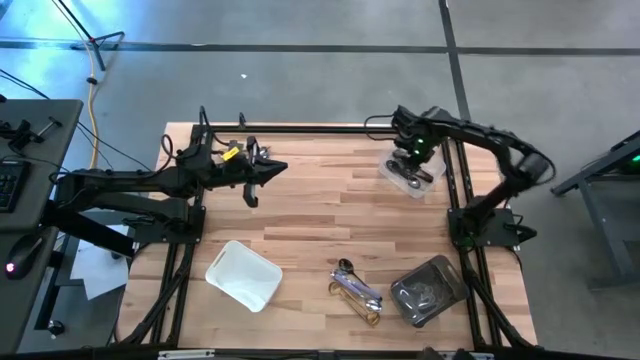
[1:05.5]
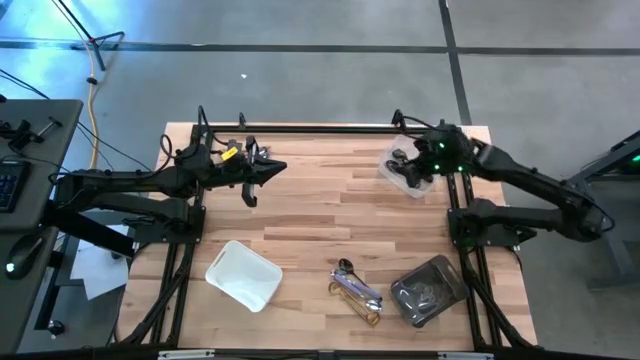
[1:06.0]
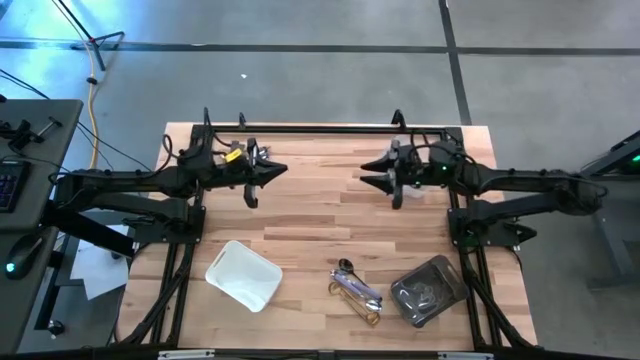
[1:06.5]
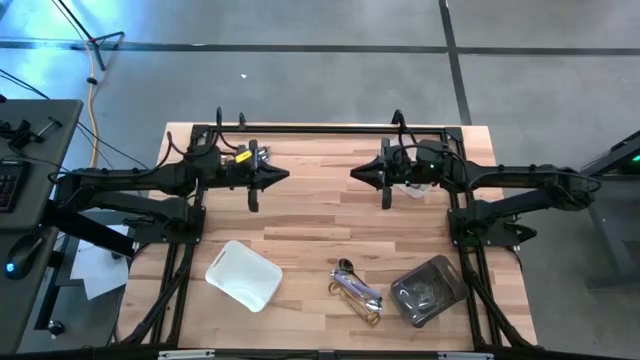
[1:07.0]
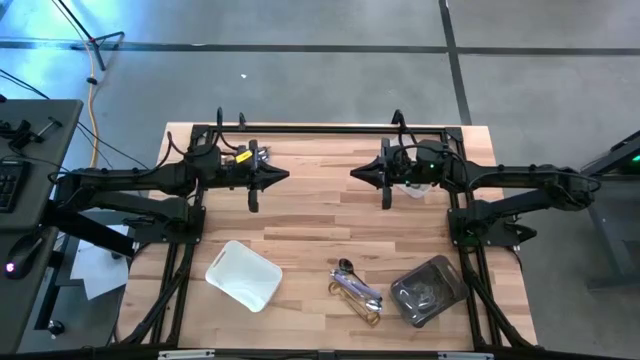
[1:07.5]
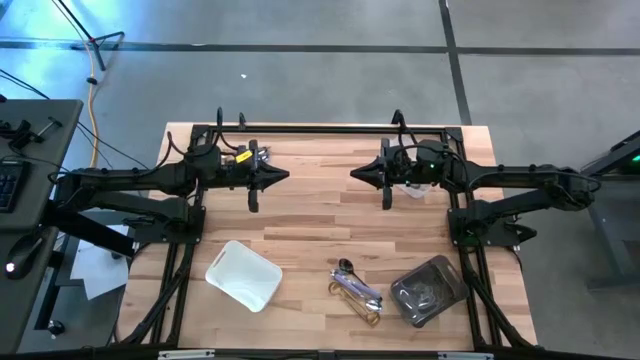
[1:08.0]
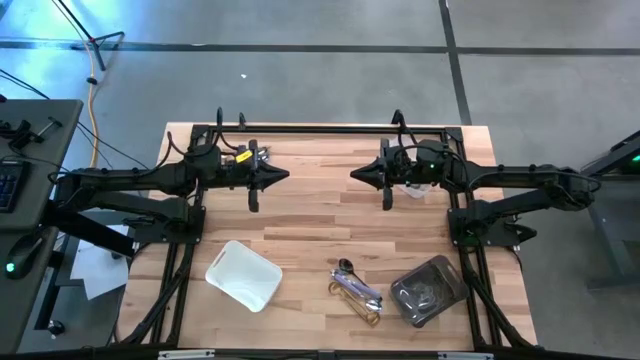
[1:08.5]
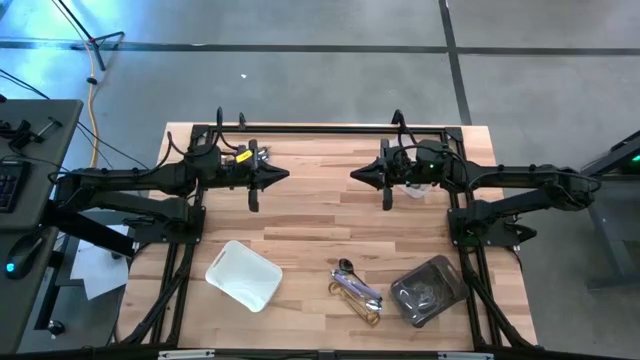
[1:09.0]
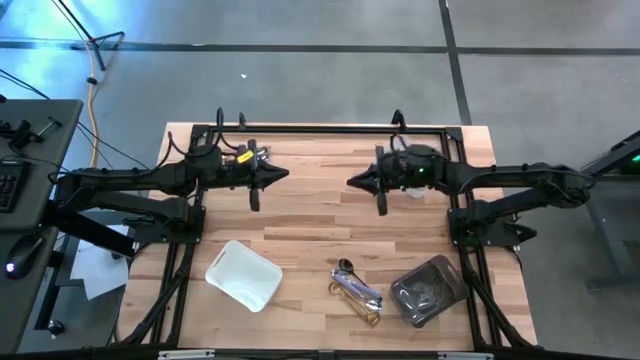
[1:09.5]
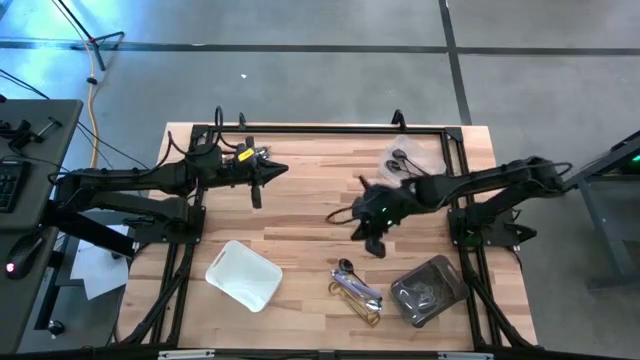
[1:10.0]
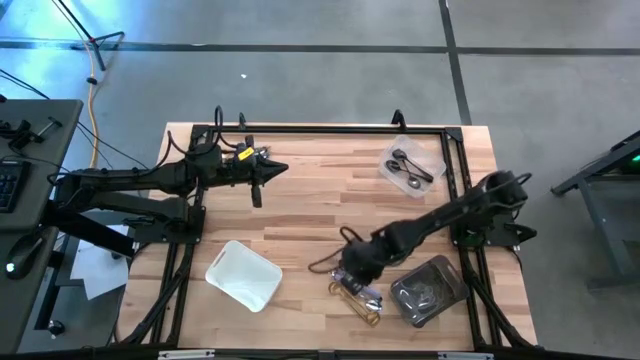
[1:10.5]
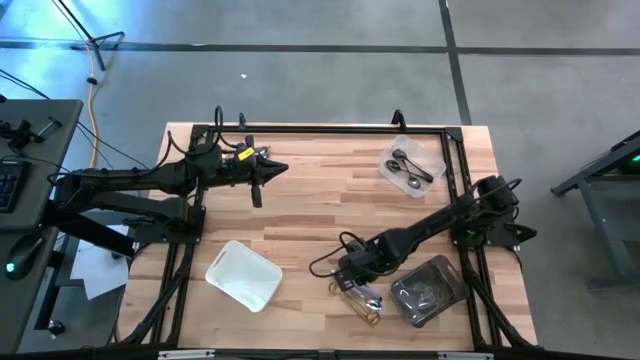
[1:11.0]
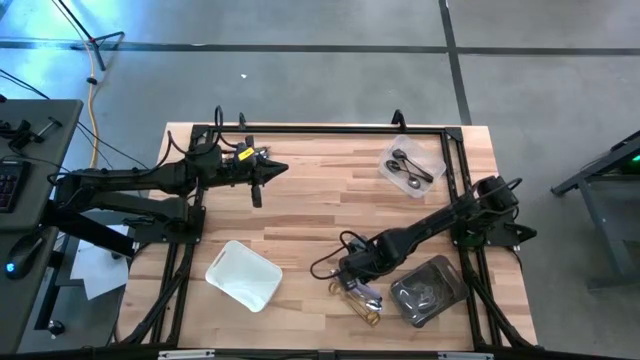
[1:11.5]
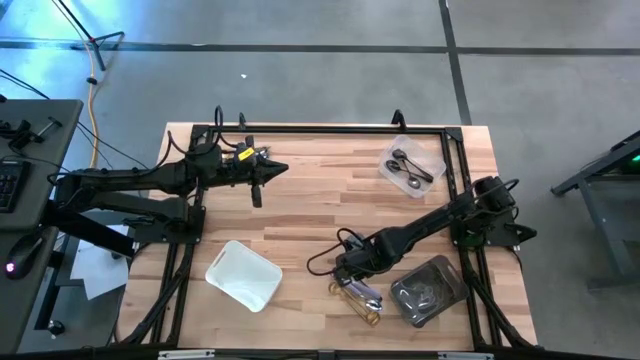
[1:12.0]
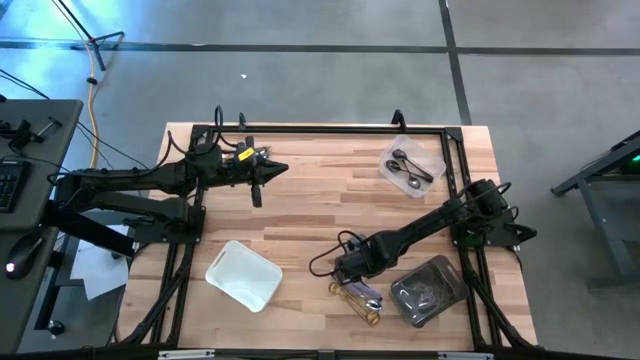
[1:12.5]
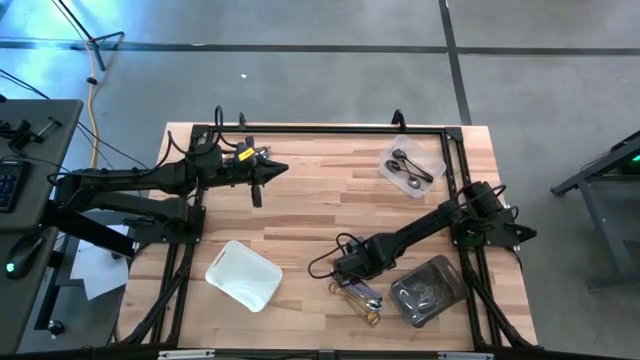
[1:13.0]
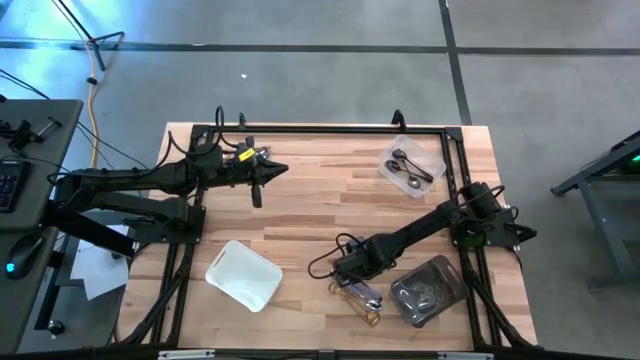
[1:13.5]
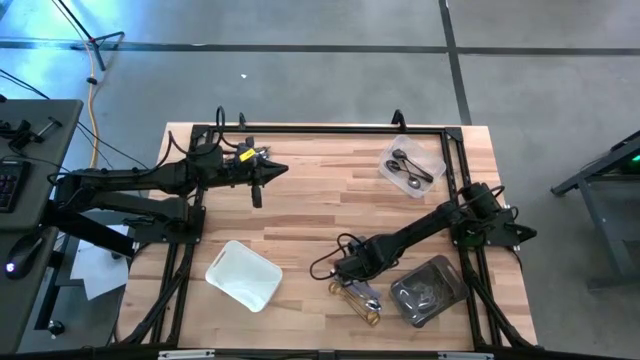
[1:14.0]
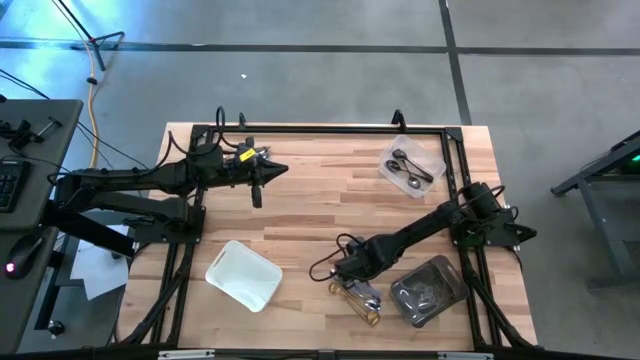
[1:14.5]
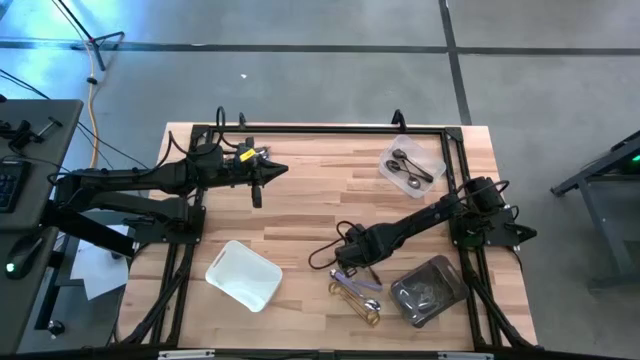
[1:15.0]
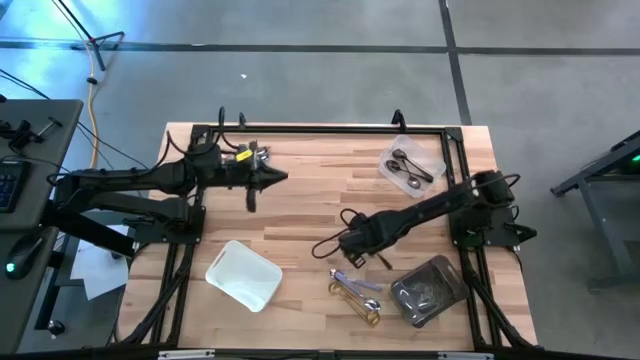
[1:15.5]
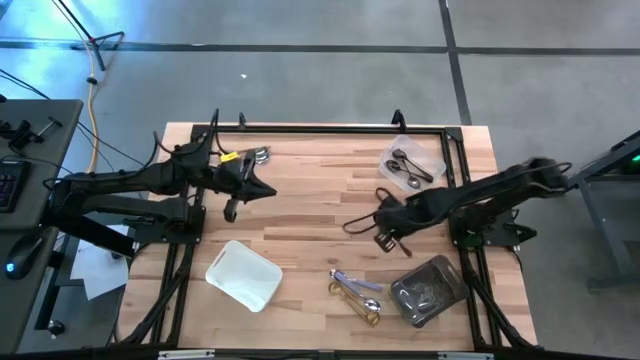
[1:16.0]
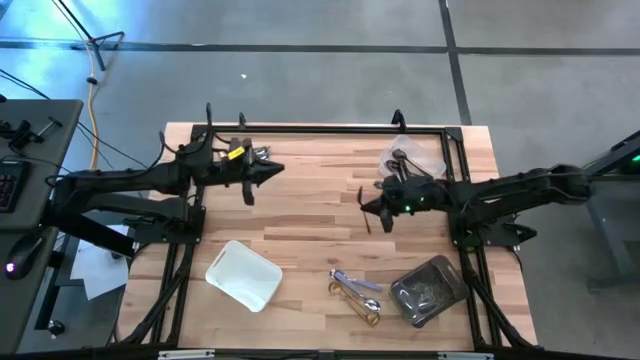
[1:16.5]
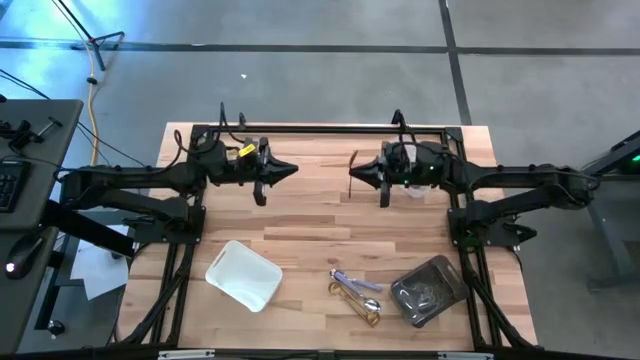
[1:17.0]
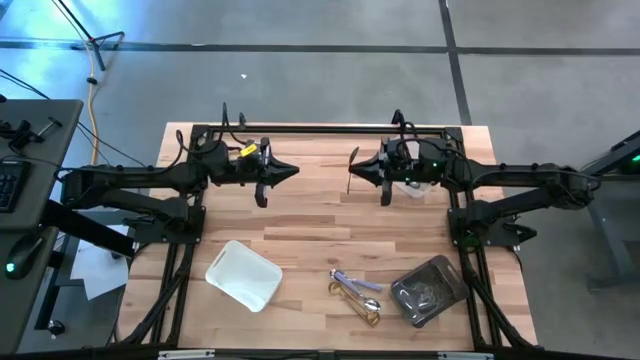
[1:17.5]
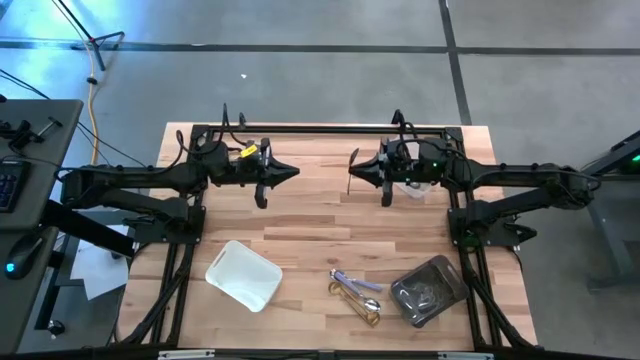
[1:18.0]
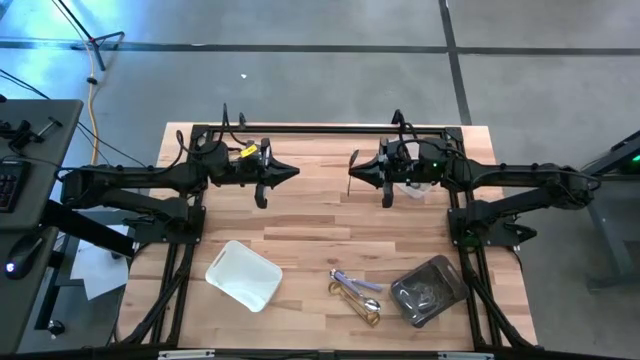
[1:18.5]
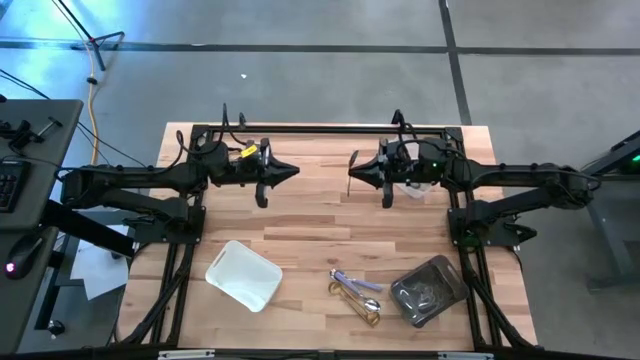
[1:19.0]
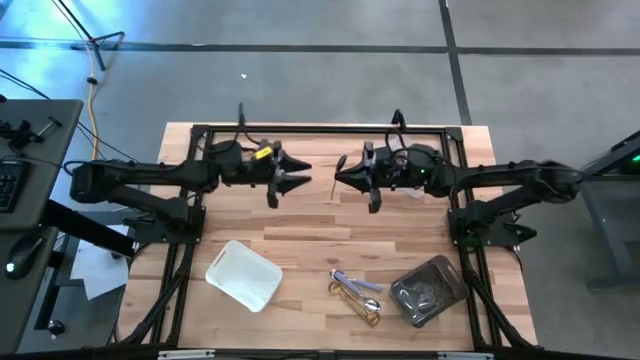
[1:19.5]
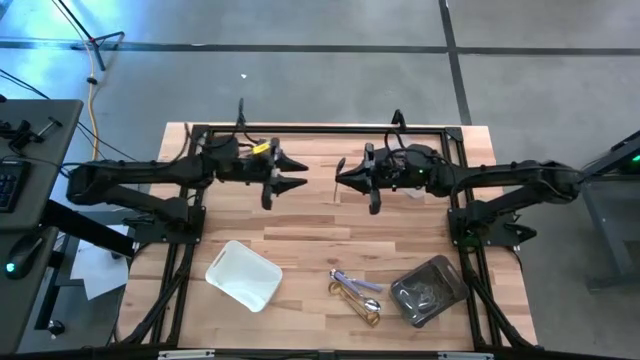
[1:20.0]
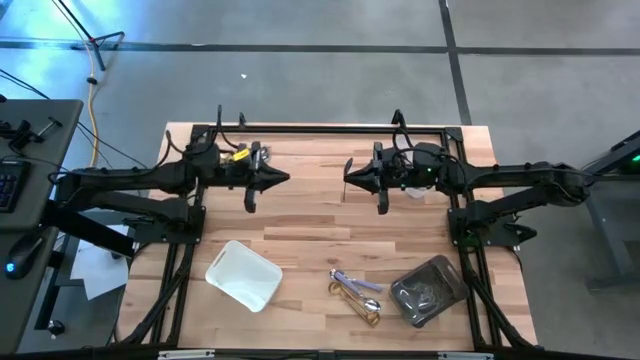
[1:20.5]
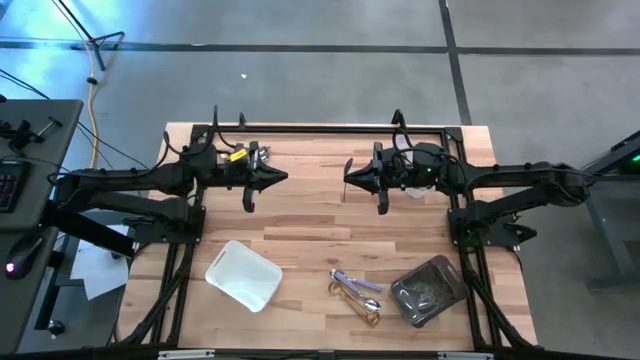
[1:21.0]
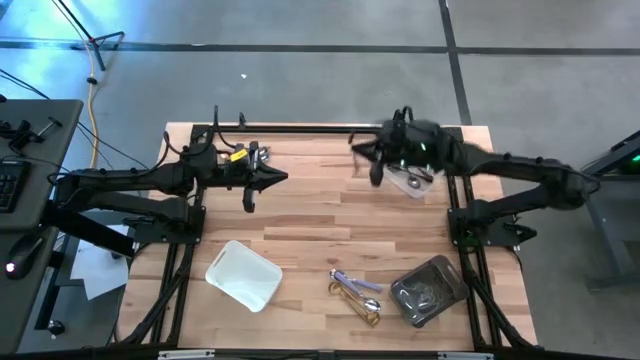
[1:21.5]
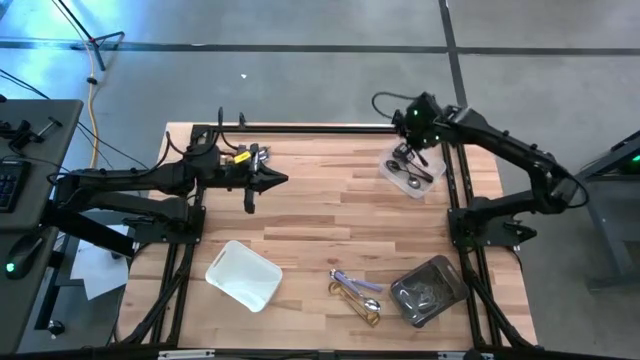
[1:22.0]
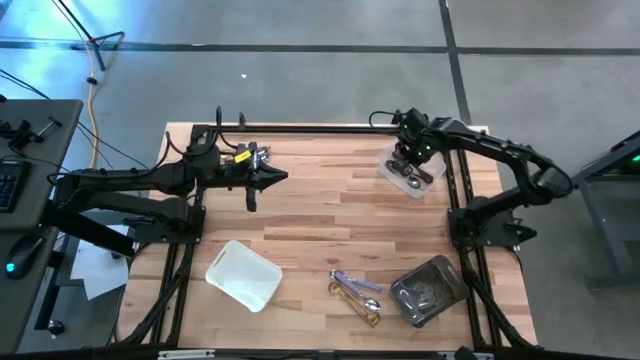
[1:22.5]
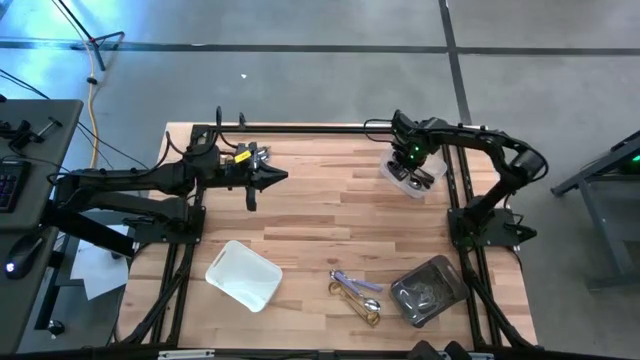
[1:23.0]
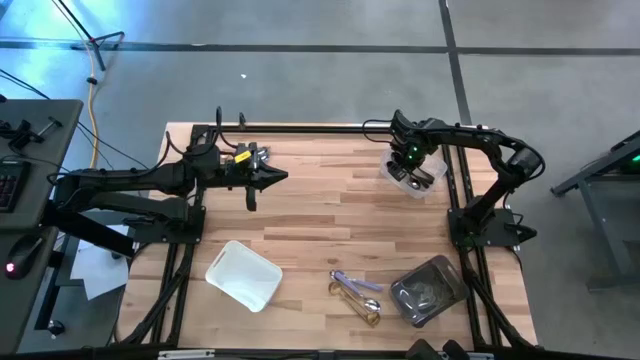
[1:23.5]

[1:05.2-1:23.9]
Task: Sort silverware by color (type)
Put the black spoon into the transparent bin

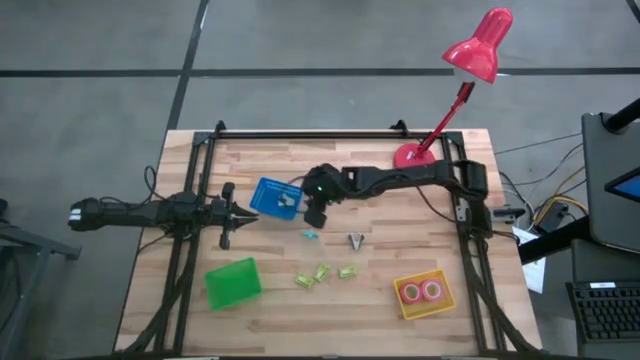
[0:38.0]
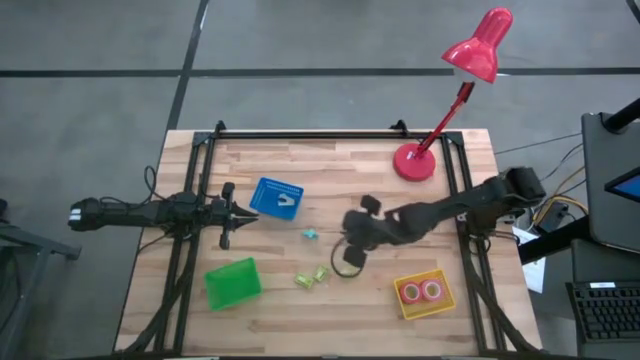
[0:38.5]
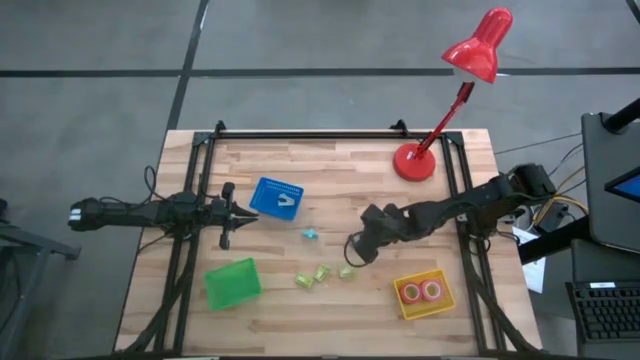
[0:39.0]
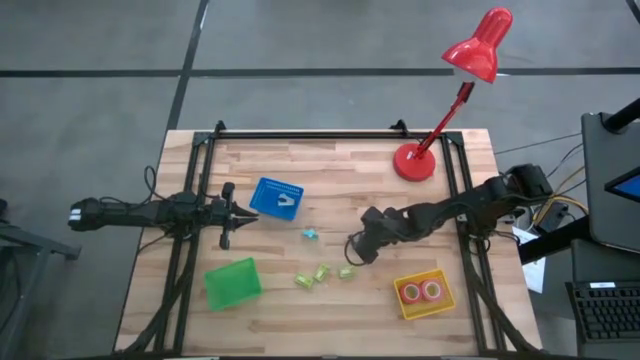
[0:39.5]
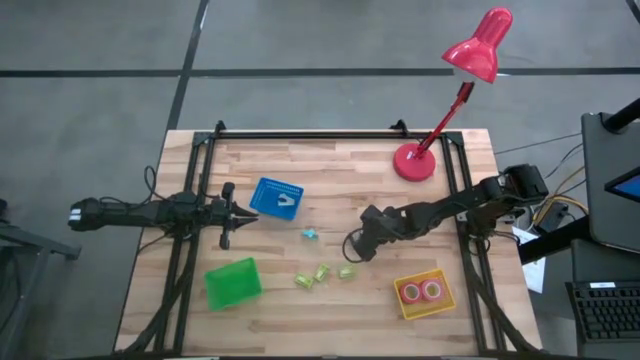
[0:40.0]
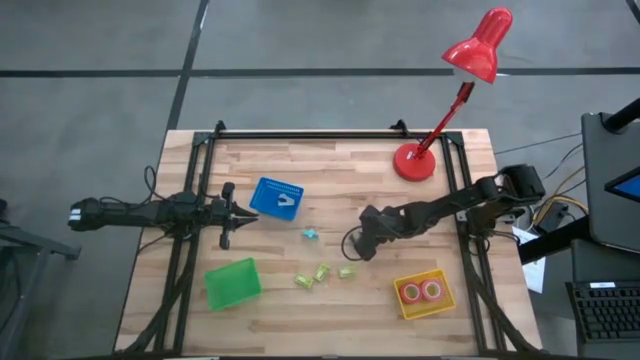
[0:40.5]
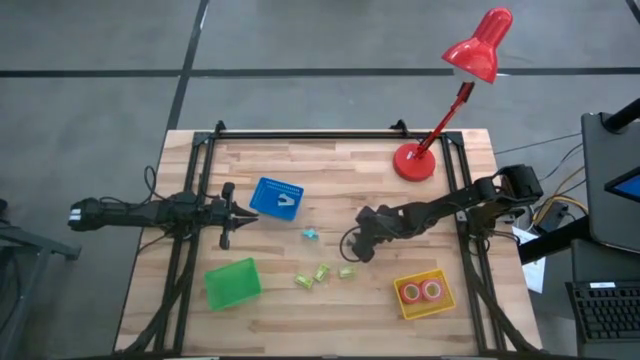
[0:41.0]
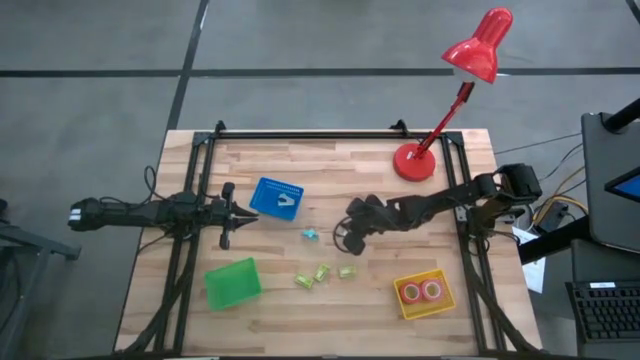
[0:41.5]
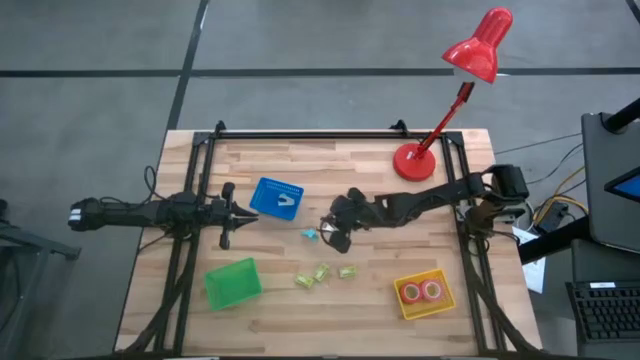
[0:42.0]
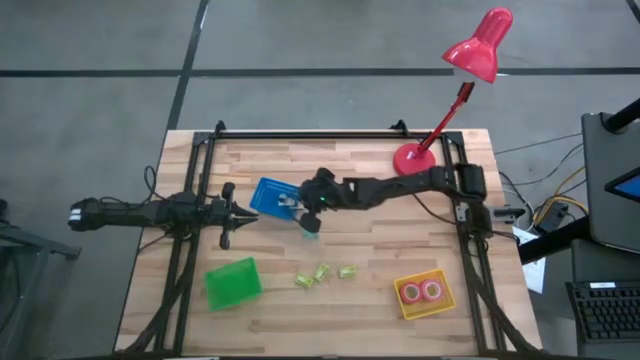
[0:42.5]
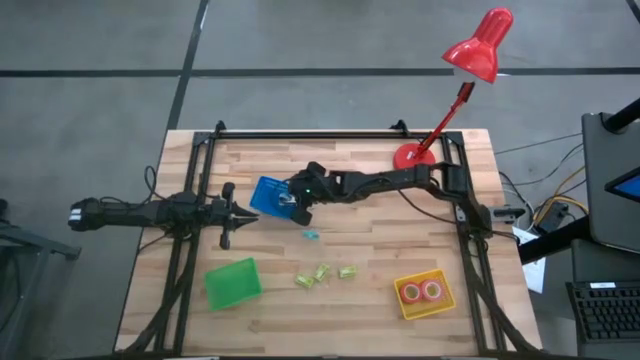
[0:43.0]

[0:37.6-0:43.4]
Task: Pick and place Stapler, Stapler remover, tape
Put the black staple remover into the blue bin
